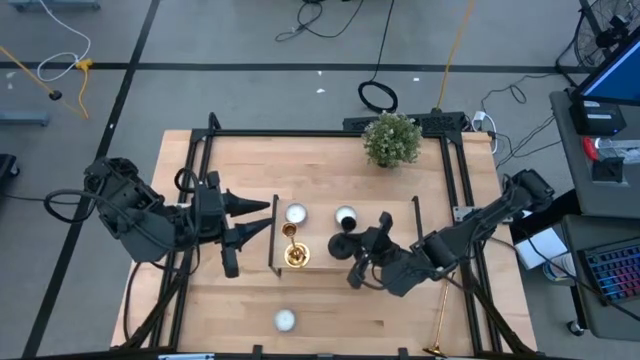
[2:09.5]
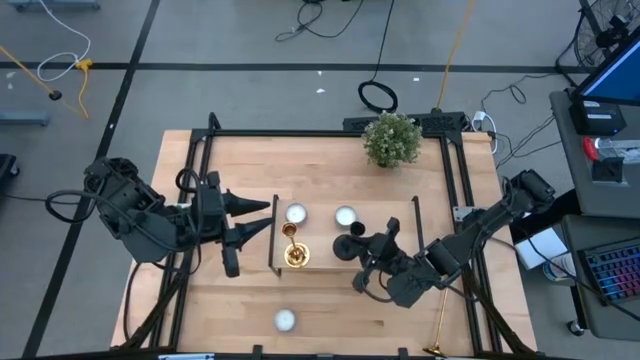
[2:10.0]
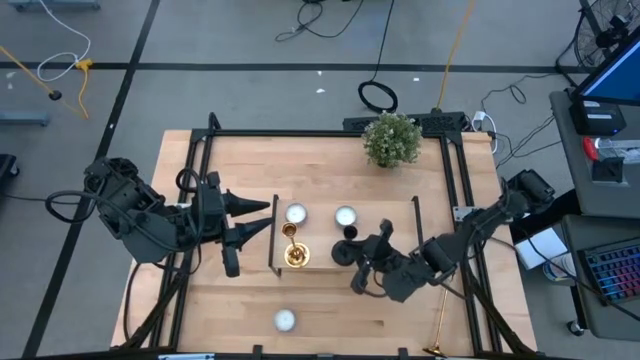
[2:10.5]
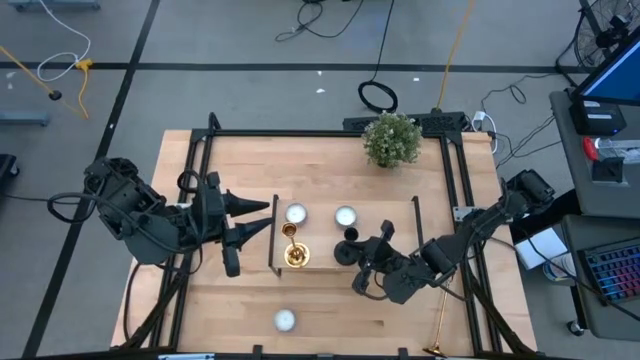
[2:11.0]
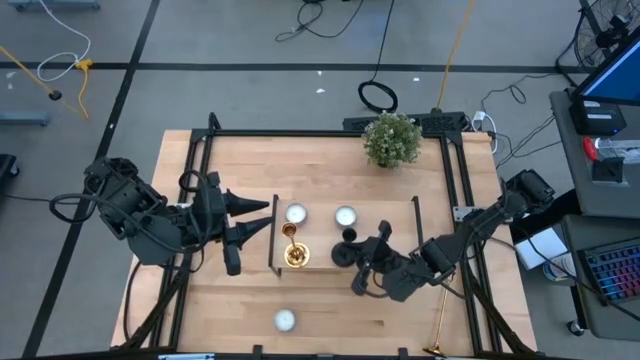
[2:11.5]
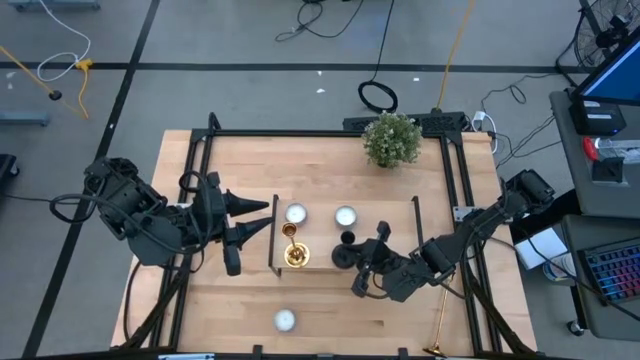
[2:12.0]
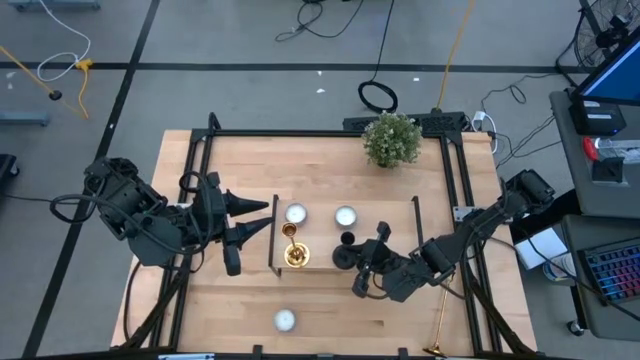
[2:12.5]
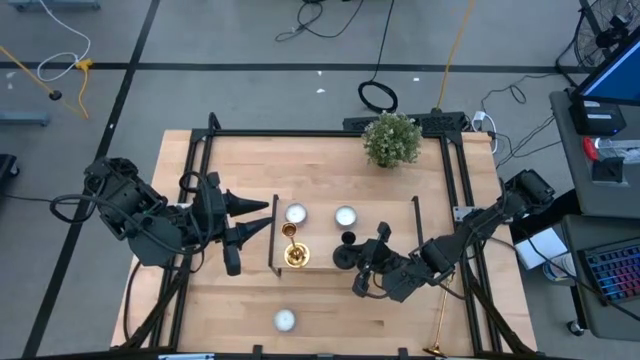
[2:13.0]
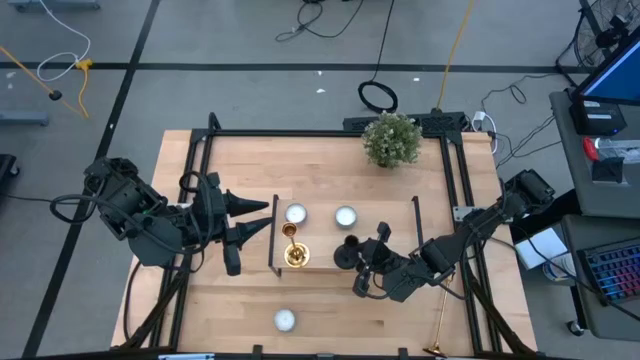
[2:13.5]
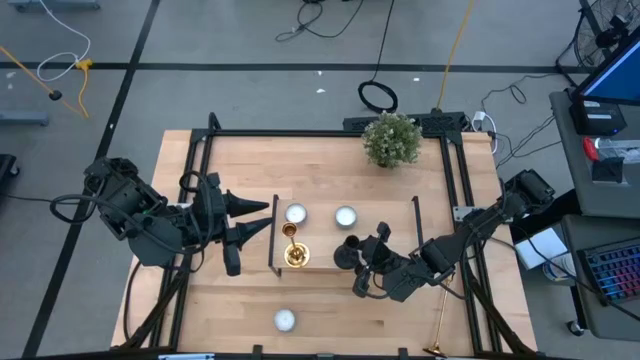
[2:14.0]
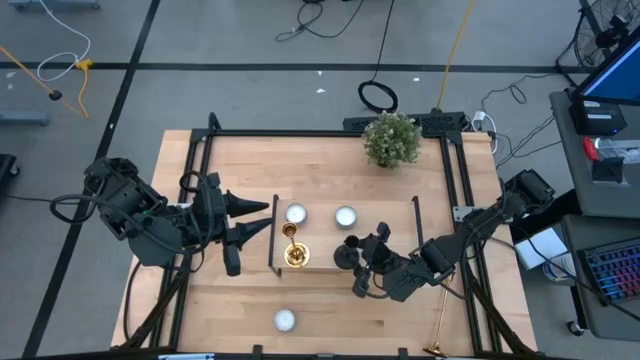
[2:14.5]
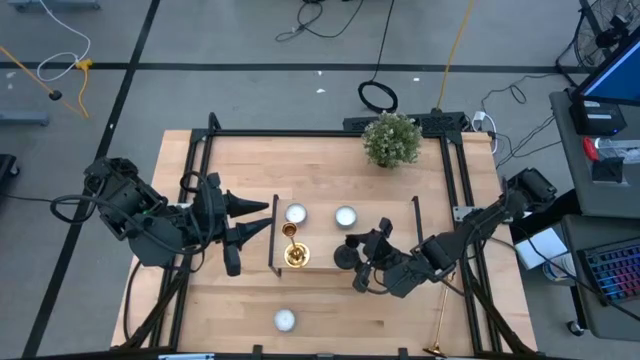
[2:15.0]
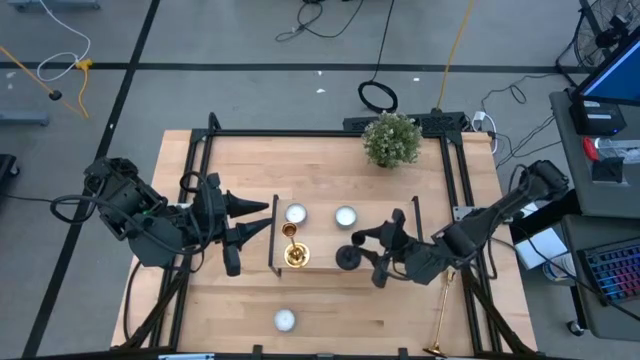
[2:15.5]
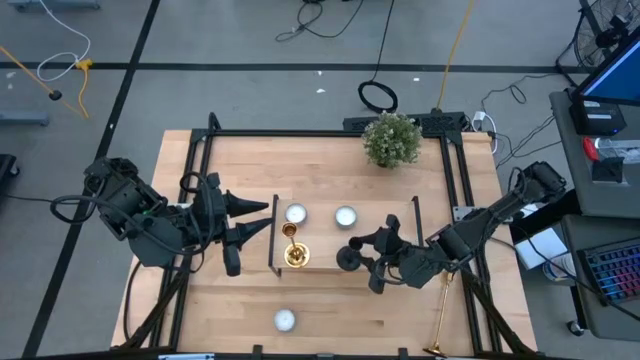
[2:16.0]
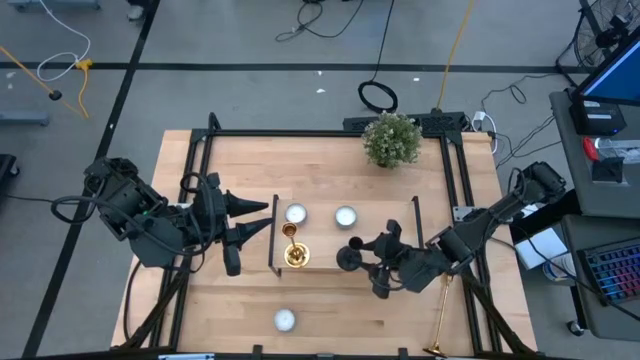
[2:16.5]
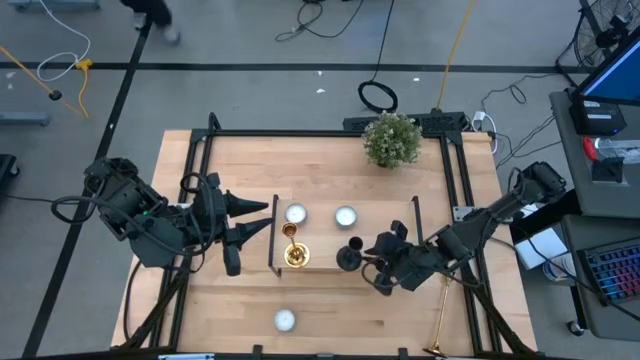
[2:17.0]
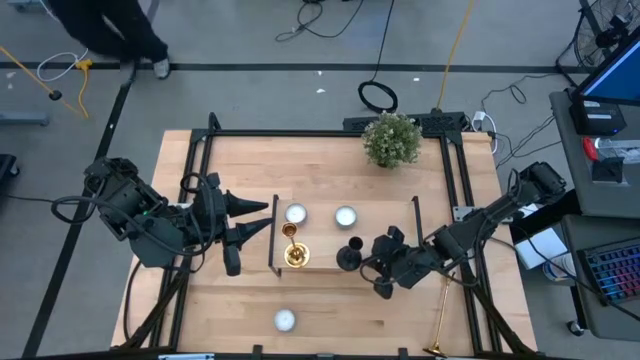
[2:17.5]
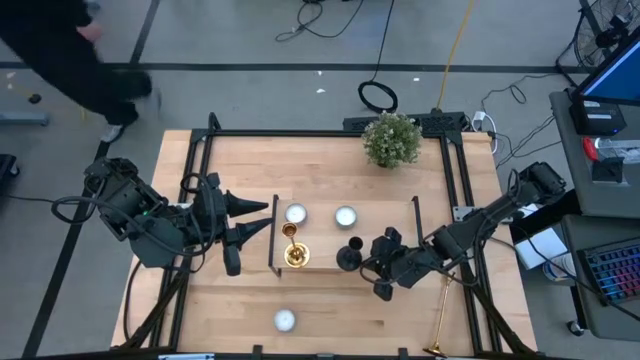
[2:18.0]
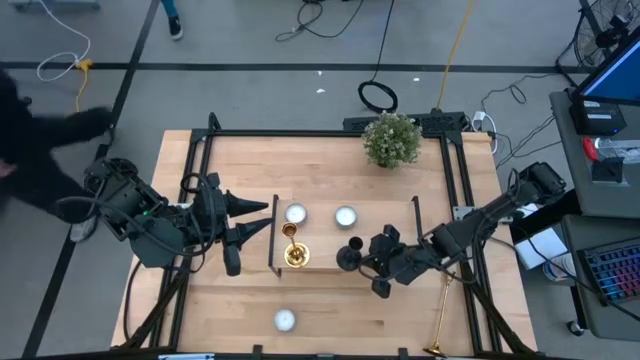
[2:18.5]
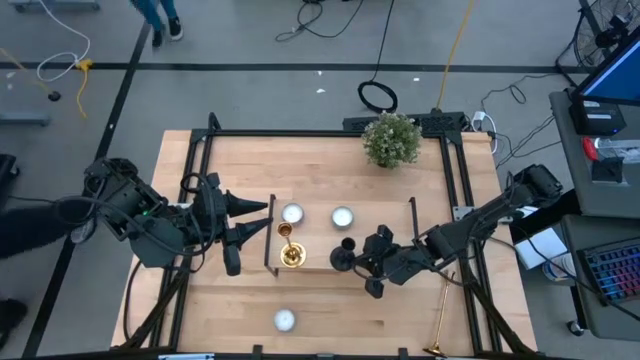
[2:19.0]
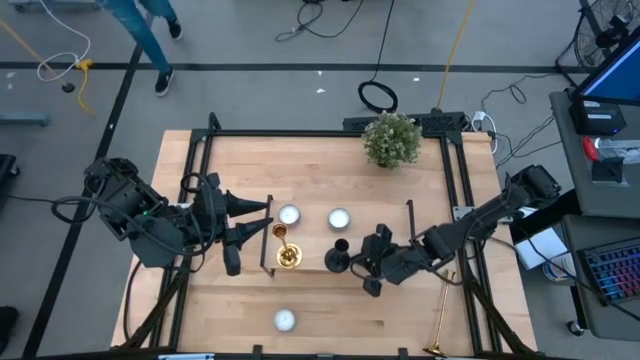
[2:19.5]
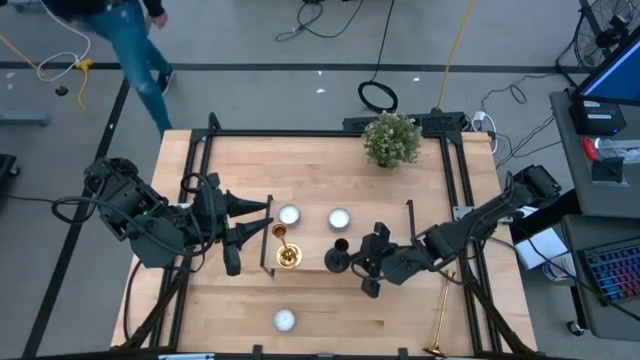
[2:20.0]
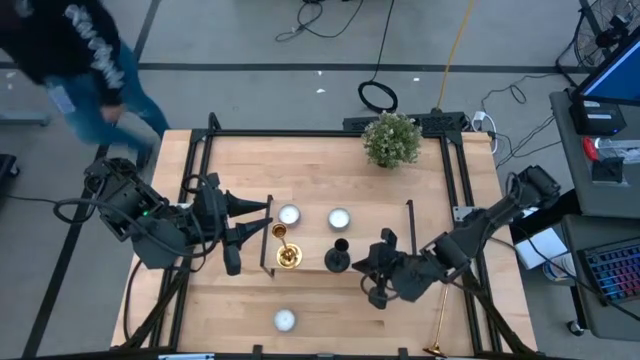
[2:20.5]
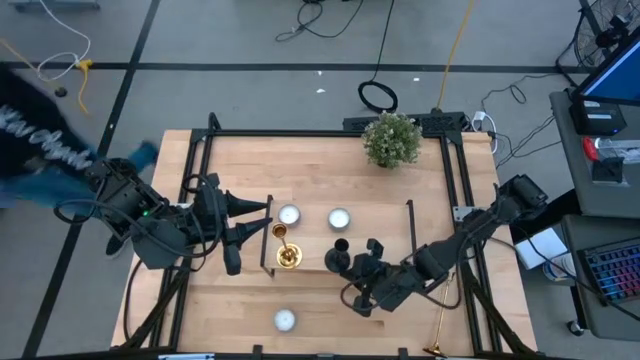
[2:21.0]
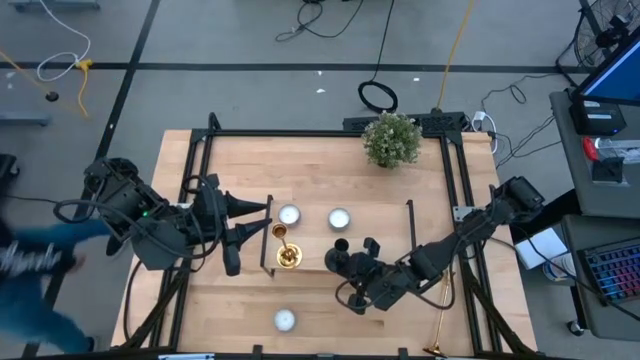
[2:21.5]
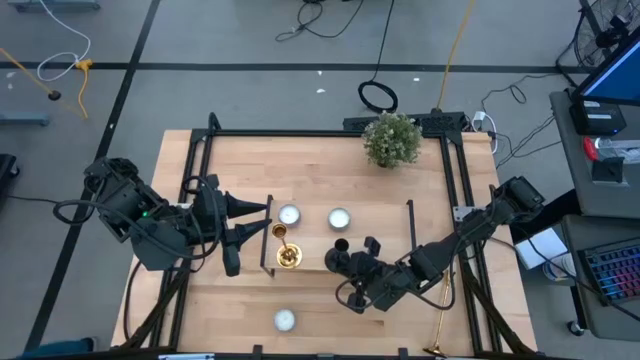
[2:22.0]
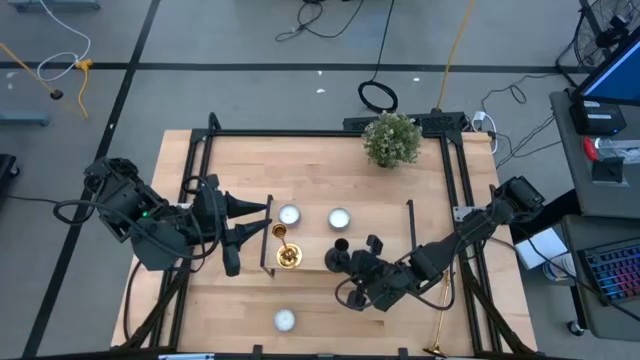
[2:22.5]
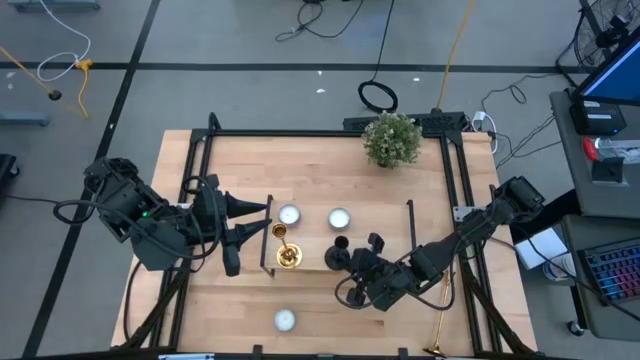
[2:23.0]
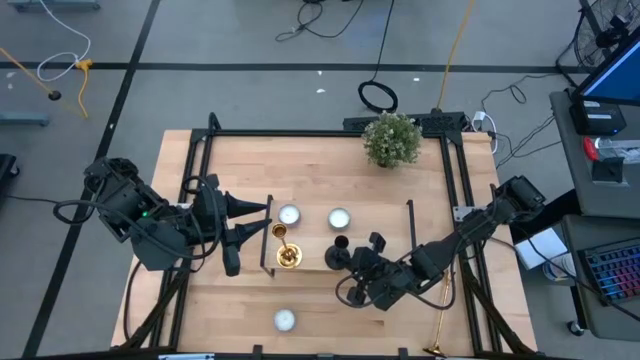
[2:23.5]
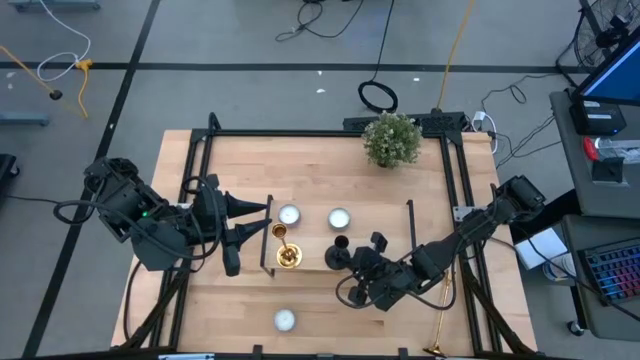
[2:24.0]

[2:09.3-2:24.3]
Task: Pick & Place candle stick holders
Put the black candleholder on the shelf

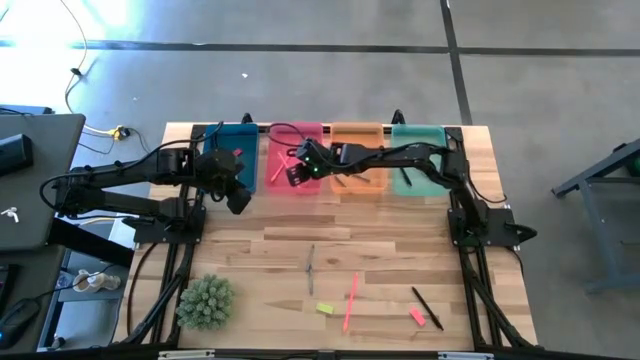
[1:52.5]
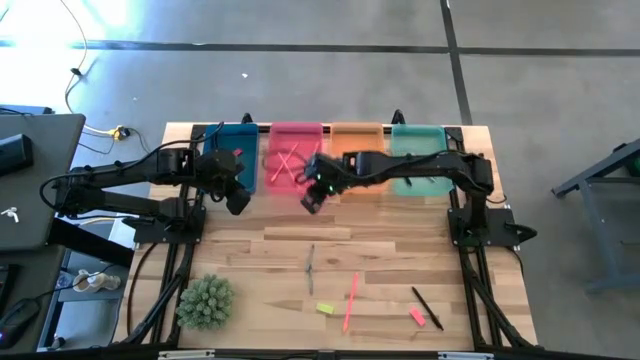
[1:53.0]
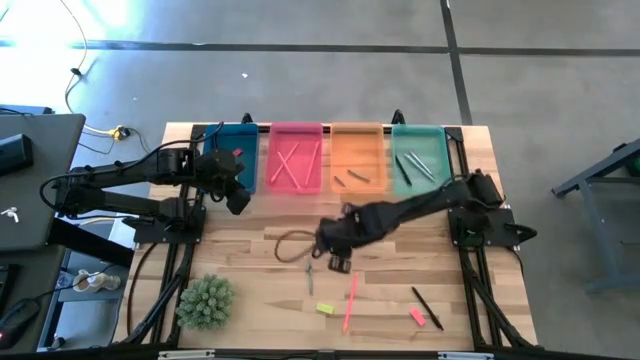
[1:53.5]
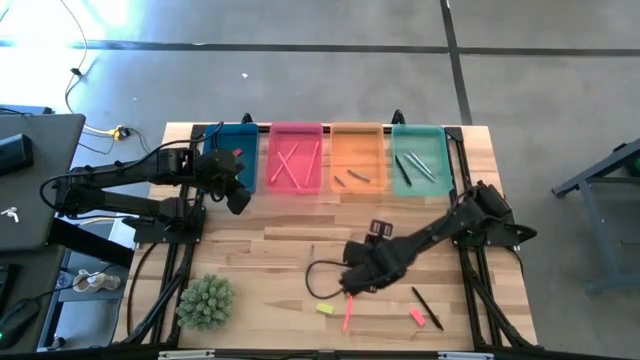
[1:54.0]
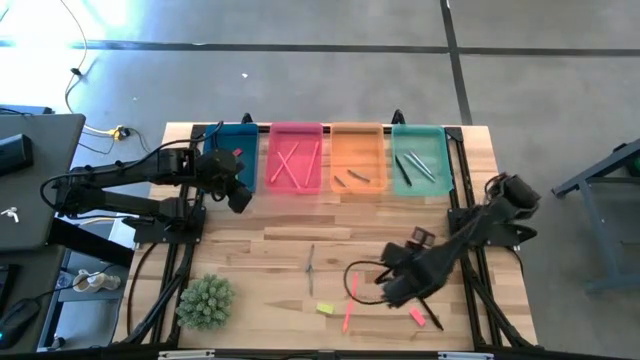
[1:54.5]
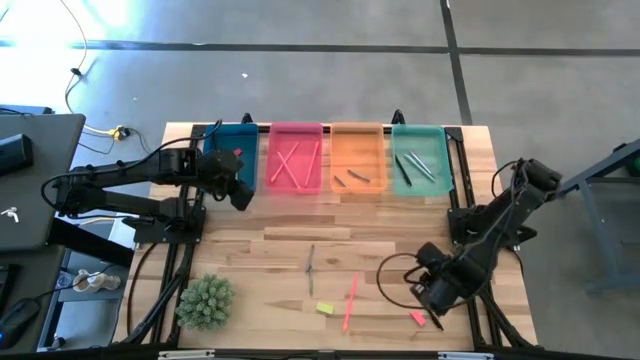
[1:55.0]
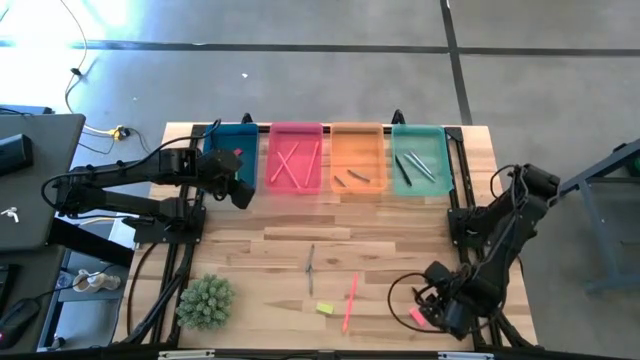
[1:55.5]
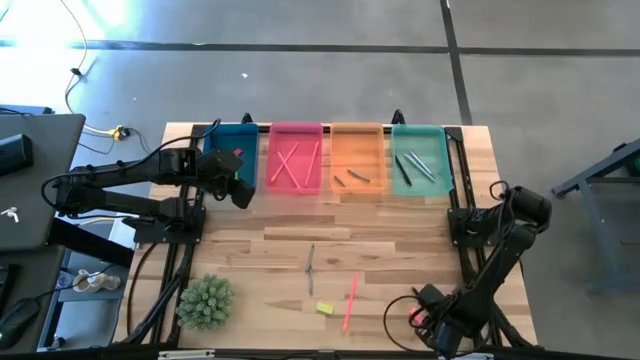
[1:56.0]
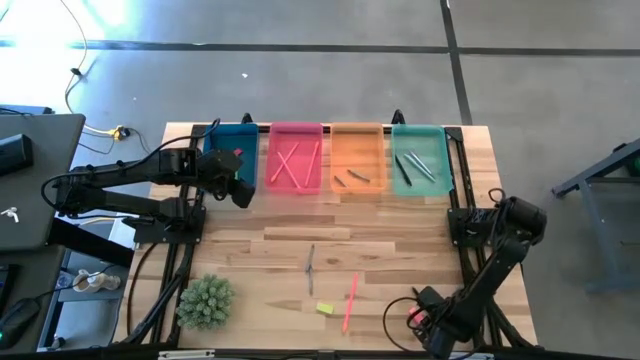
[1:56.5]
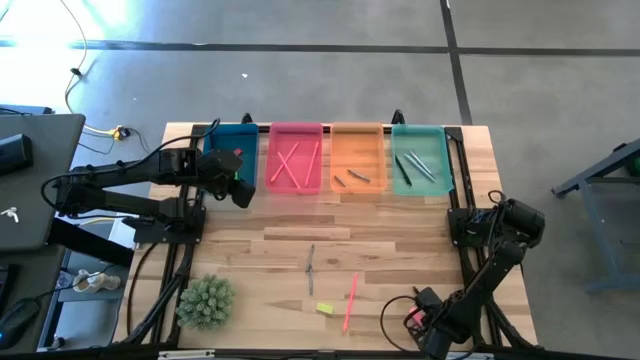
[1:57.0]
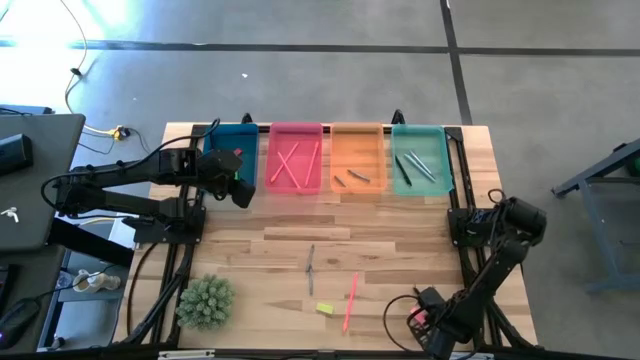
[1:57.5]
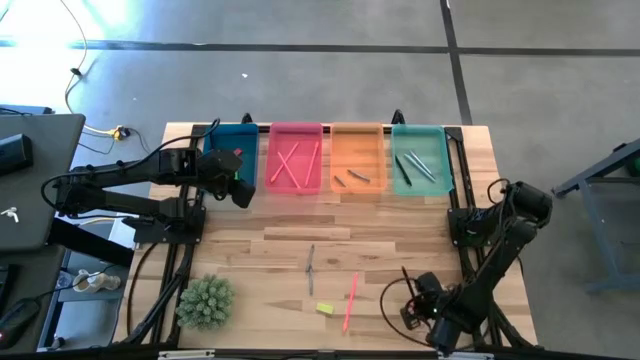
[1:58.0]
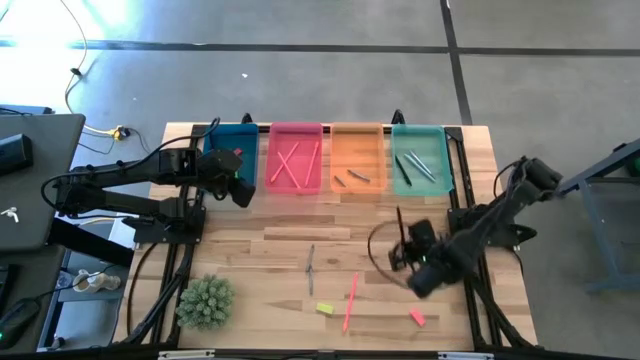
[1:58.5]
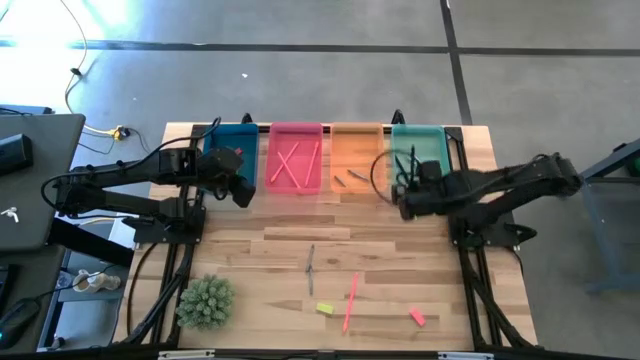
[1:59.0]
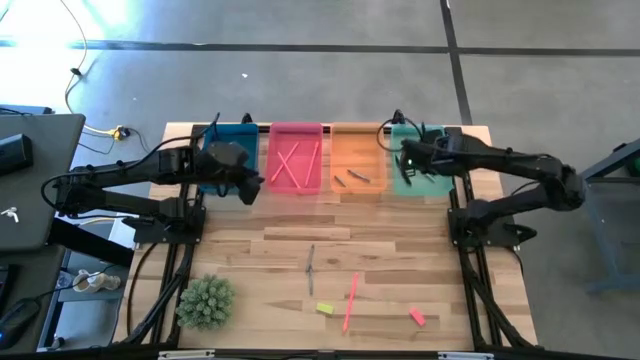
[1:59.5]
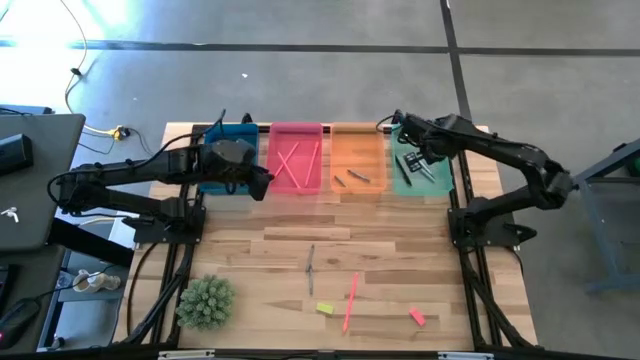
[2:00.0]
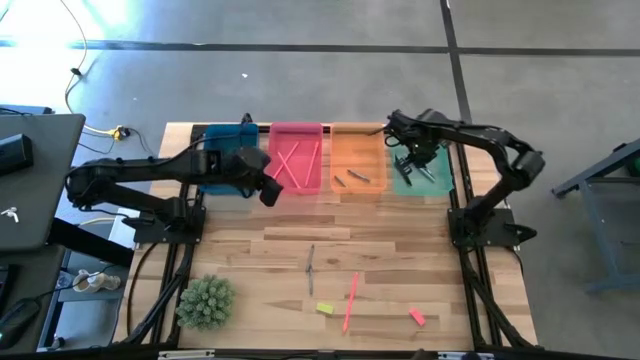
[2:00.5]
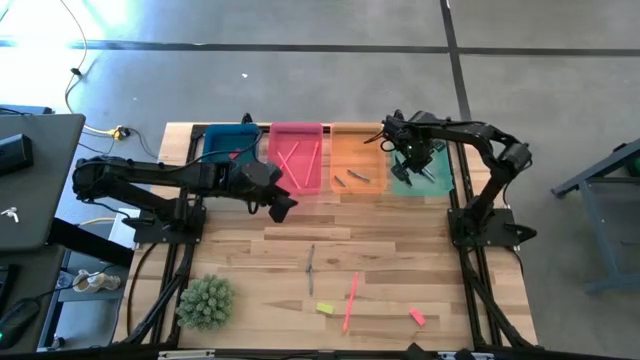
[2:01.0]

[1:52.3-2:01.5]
Task: Sort crayons/erasers/pens/pencils in bins
Put the black pen into the green bin
